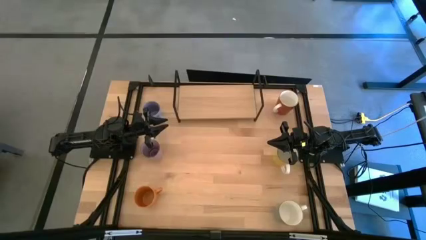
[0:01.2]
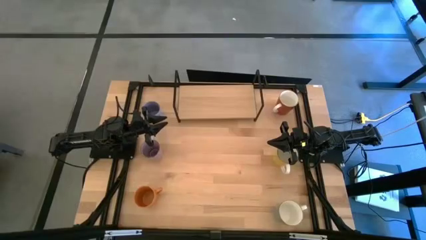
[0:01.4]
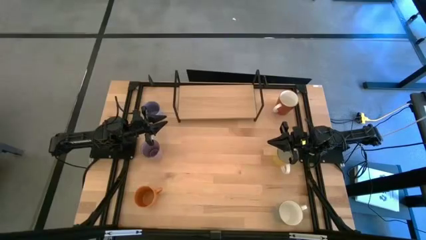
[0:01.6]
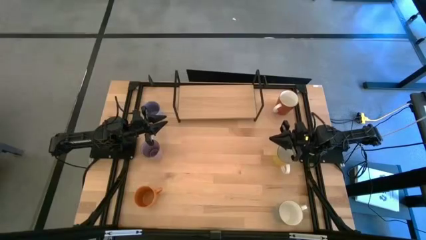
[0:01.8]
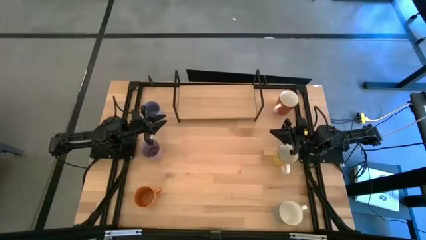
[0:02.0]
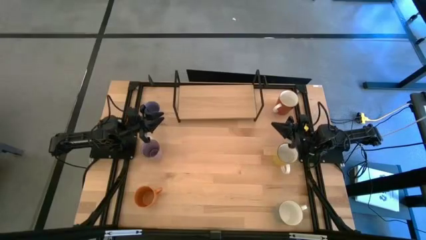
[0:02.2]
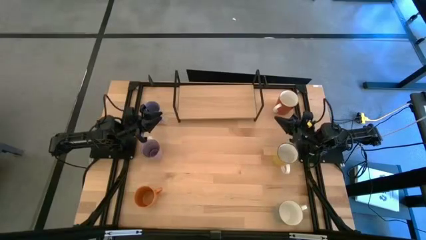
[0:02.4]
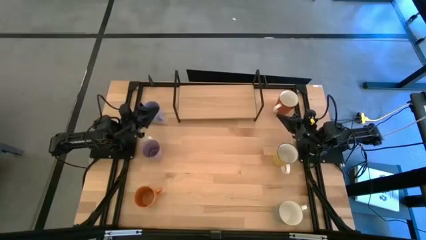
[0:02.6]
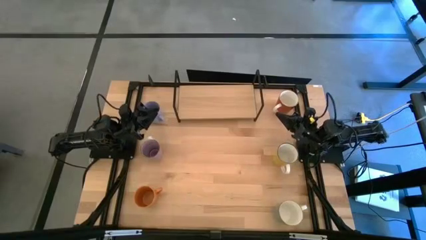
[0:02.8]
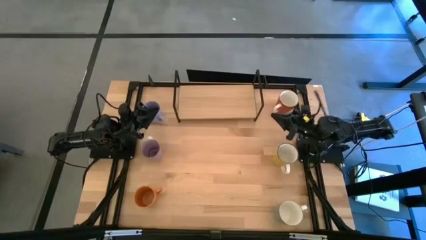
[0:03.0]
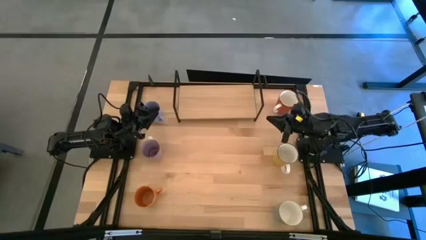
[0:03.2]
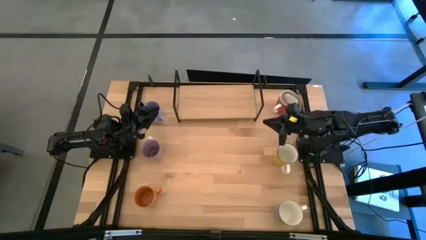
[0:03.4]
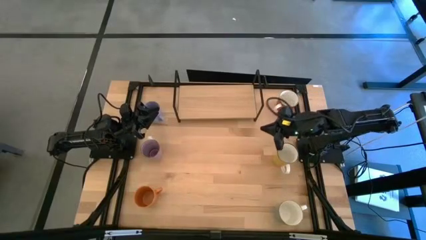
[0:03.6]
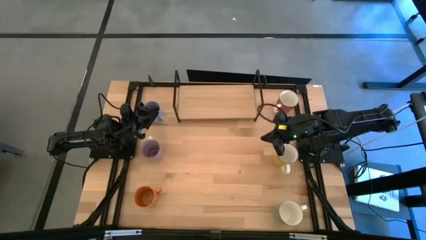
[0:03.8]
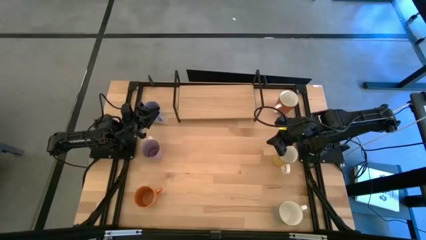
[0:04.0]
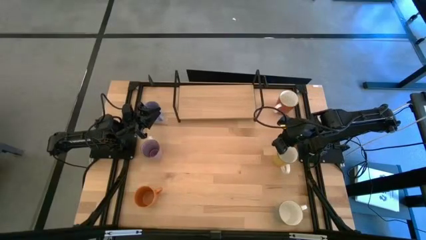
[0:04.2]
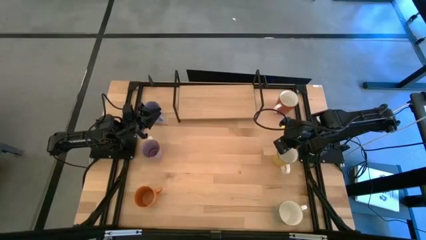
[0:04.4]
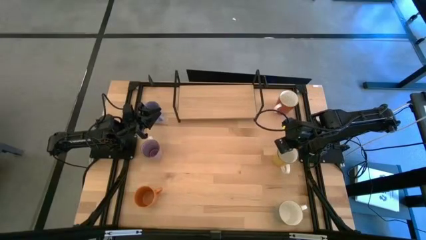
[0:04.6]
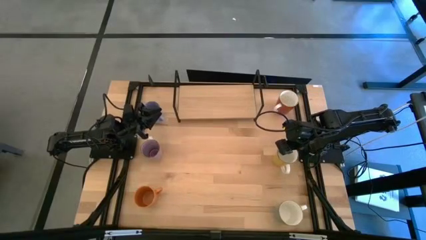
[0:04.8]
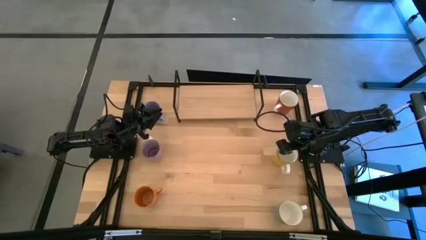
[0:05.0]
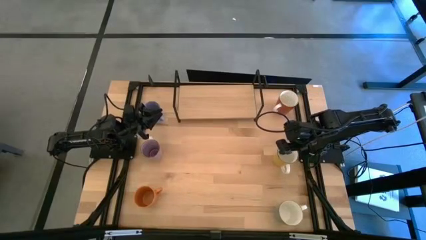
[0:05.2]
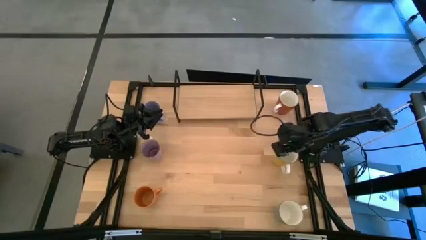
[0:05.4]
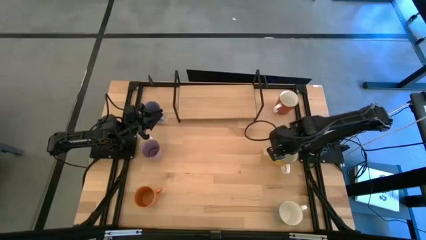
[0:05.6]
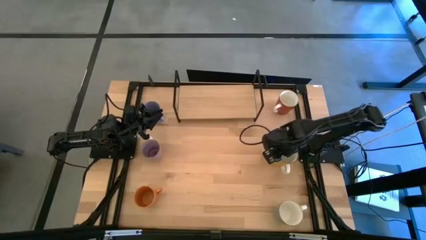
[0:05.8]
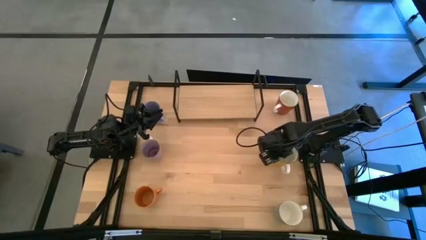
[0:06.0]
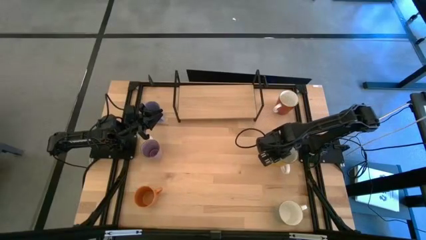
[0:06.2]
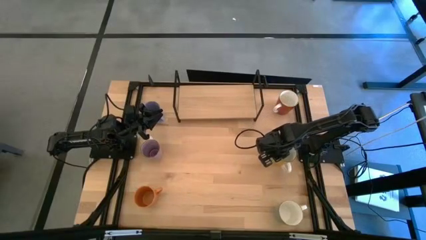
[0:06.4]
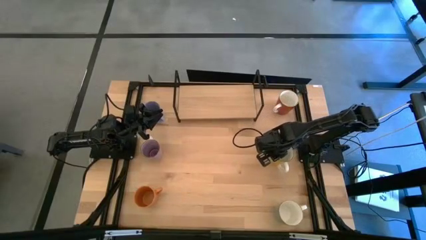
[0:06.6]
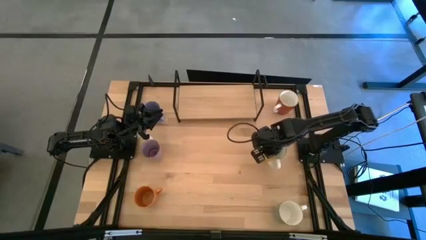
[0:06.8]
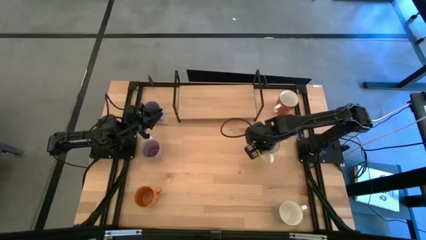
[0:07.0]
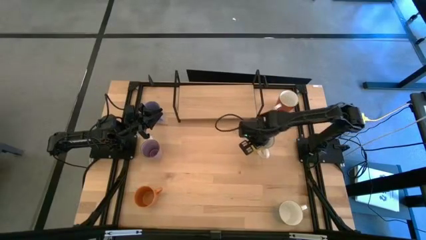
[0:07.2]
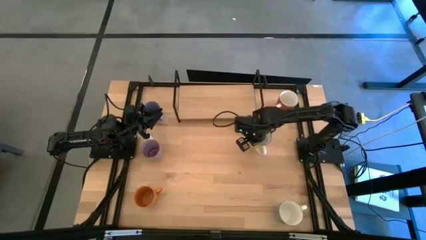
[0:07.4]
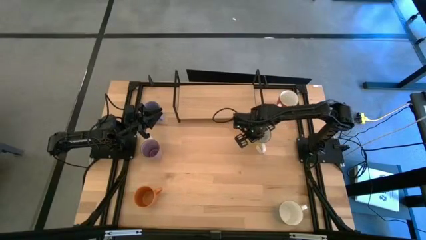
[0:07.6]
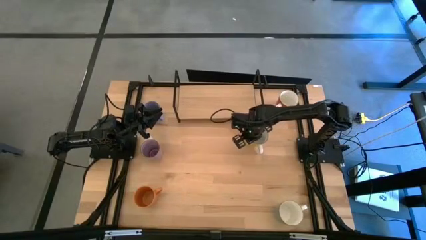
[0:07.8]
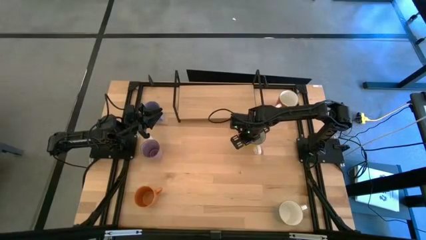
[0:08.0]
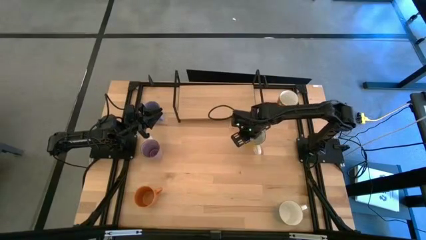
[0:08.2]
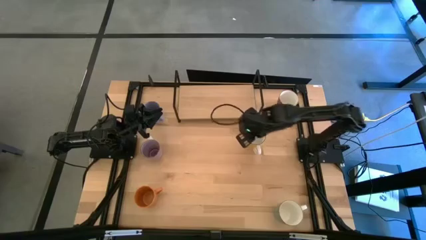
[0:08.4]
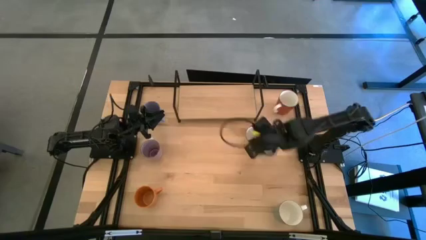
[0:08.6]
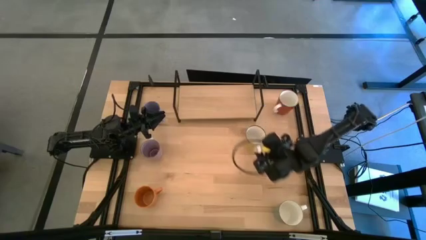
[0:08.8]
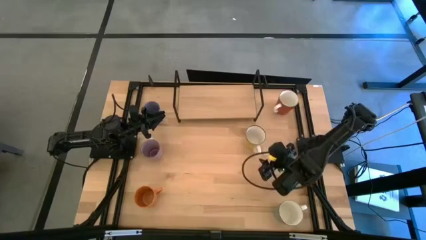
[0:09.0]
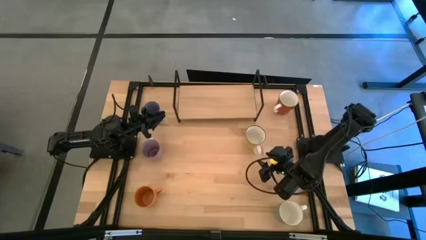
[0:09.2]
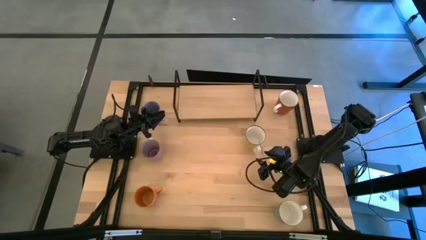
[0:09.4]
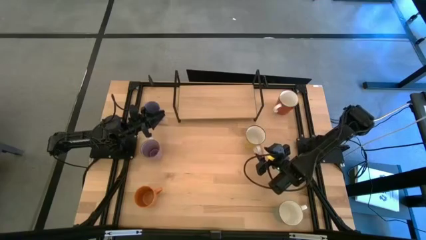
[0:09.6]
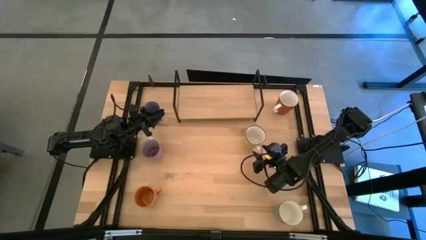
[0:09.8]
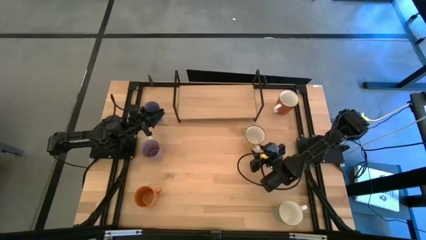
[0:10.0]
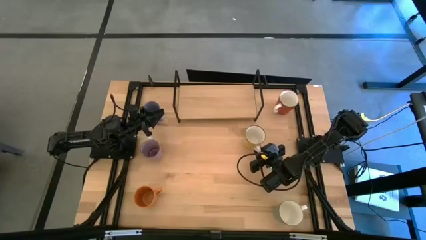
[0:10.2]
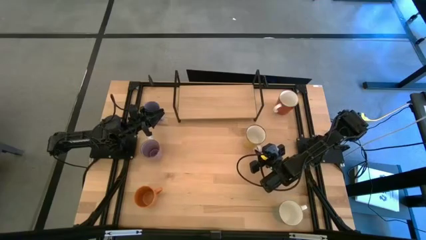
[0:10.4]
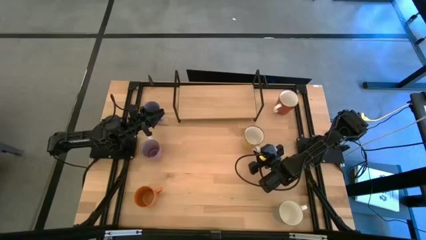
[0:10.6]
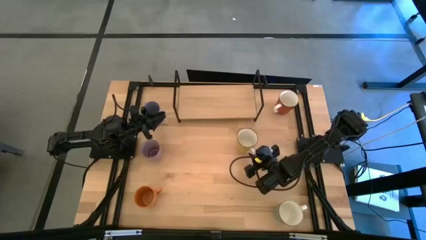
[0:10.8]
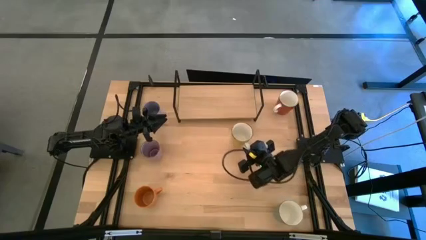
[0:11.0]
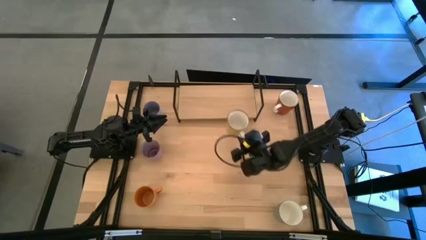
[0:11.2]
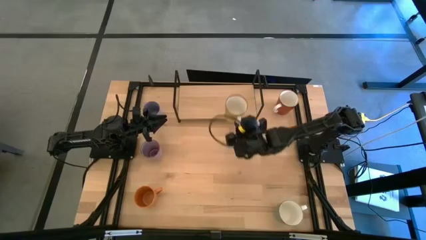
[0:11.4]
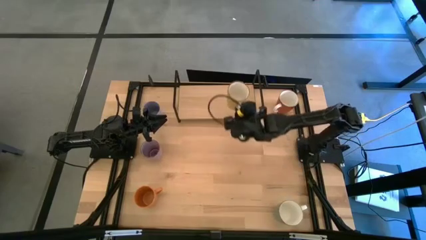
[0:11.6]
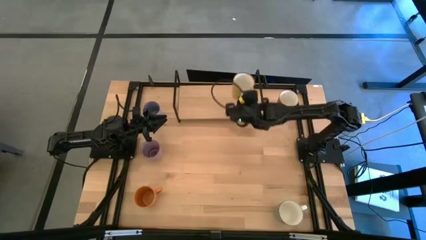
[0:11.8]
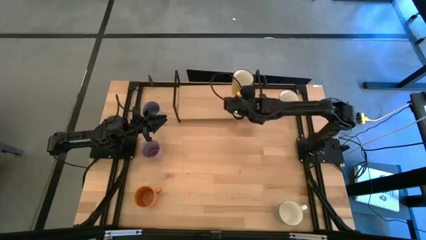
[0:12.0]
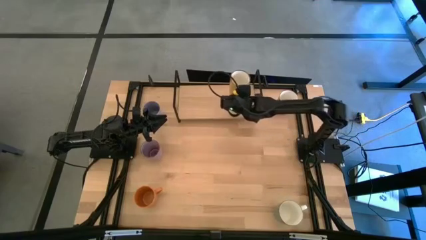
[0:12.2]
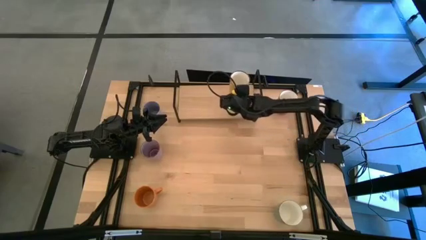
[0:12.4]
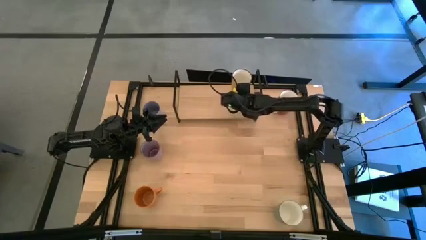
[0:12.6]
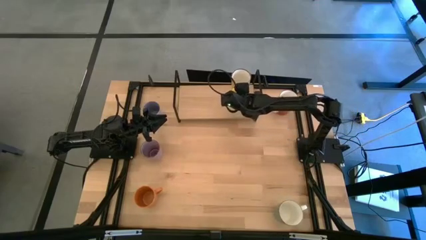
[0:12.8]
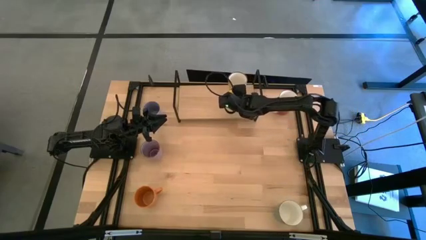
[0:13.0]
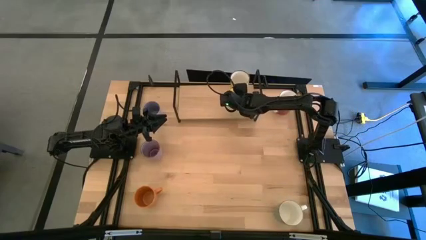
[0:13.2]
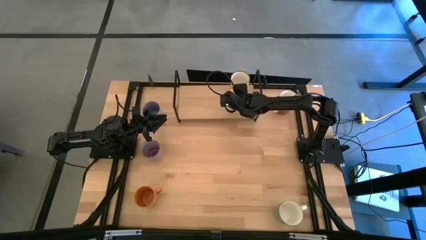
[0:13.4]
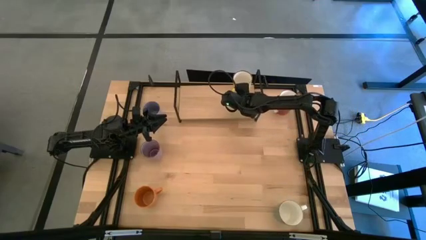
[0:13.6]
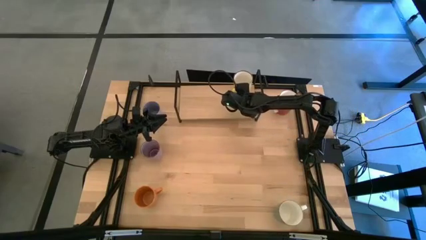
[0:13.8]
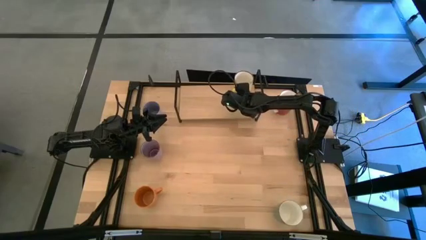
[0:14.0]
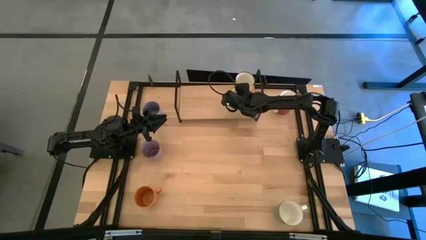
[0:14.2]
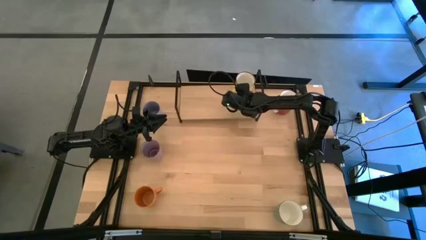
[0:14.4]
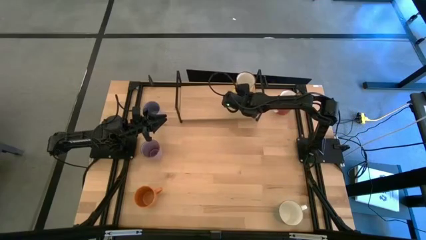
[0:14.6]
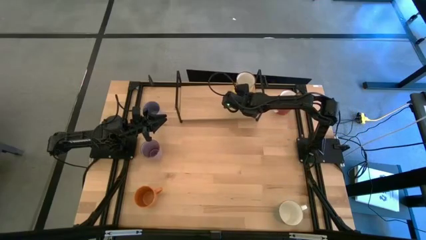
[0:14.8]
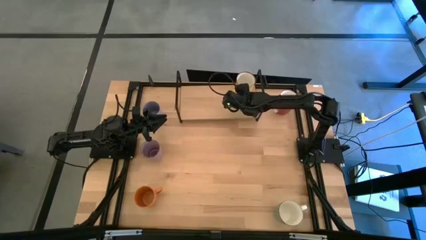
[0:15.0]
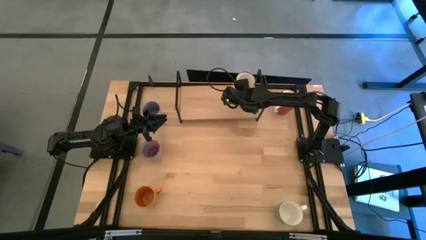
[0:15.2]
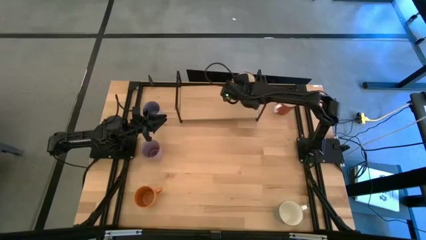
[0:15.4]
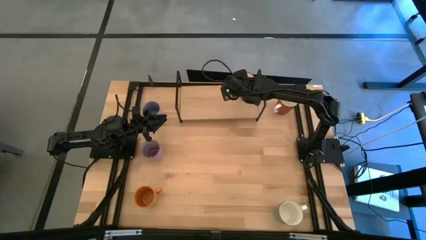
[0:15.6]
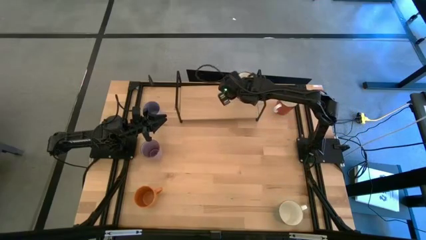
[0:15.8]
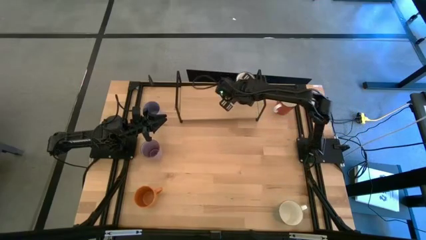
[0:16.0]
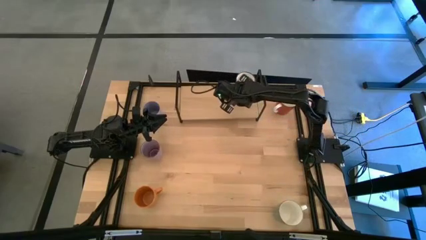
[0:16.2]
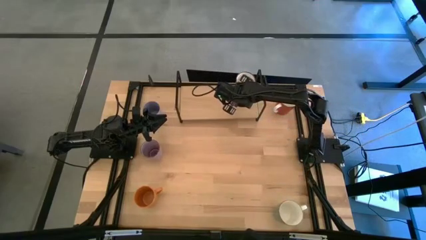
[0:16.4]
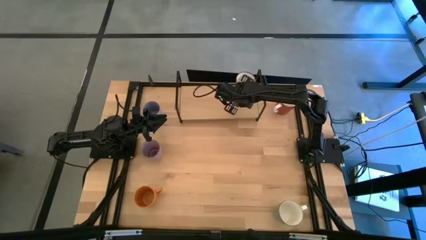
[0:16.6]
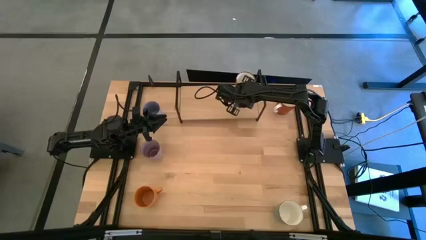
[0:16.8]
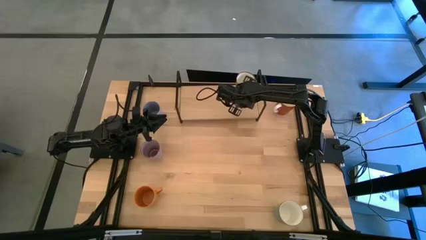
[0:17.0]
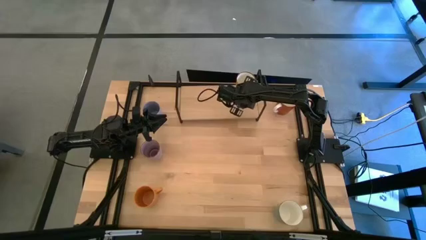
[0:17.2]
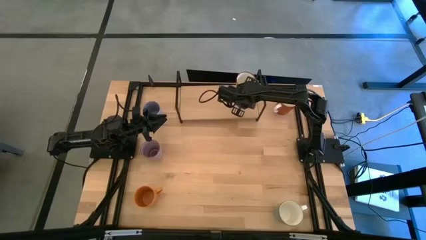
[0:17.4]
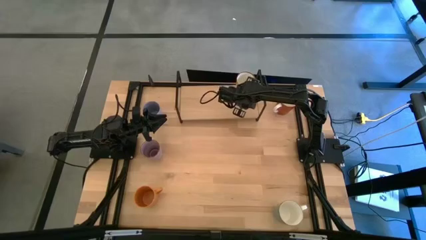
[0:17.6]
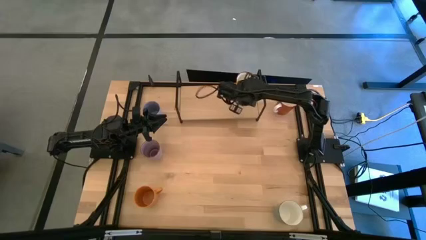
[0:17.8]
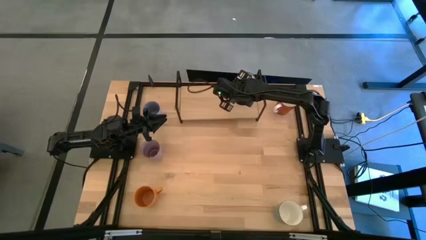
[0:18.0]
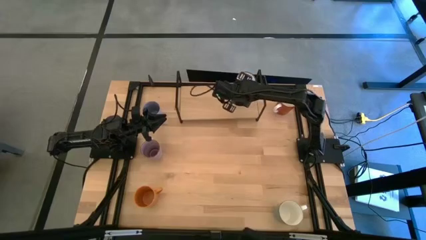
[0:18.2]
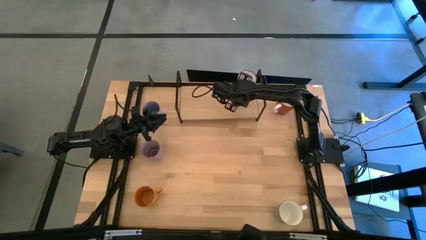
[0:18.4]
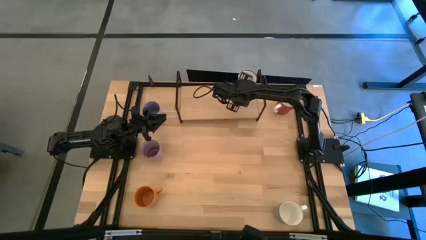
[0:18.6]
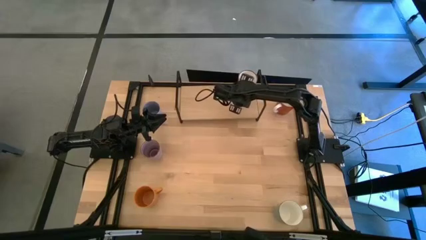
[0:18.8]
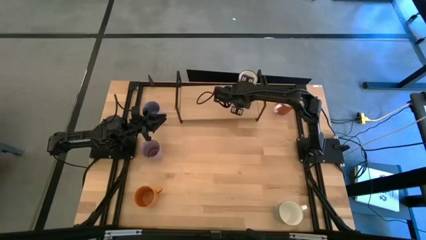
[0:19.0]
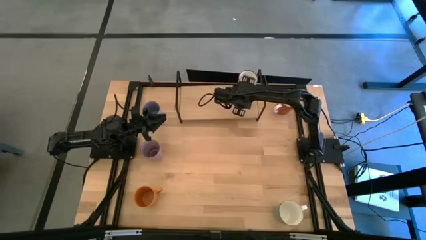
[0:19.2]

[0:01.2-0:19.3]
Task: Place coffee mugs
Put the yellow mug on the shelf
